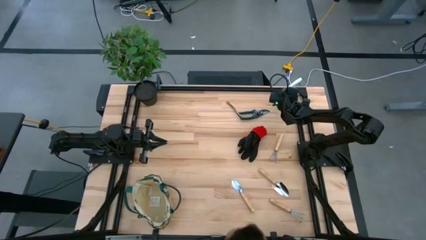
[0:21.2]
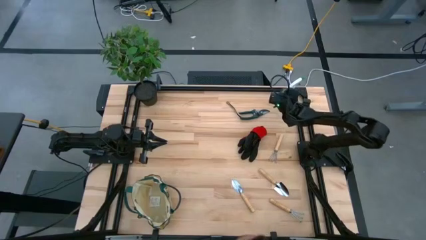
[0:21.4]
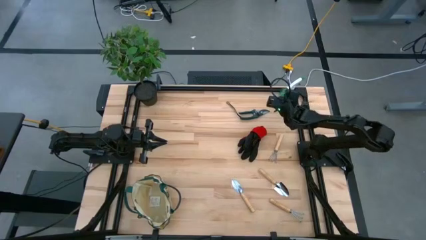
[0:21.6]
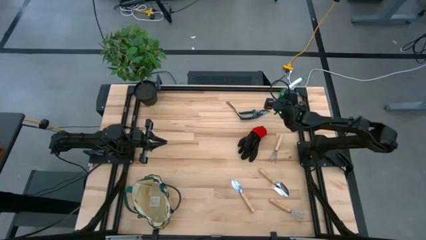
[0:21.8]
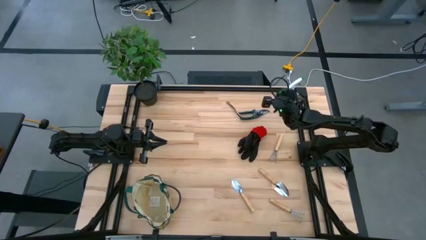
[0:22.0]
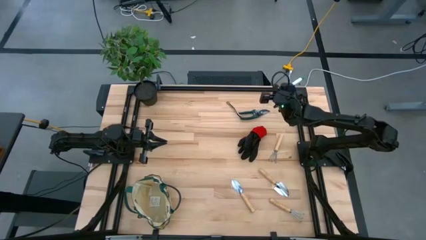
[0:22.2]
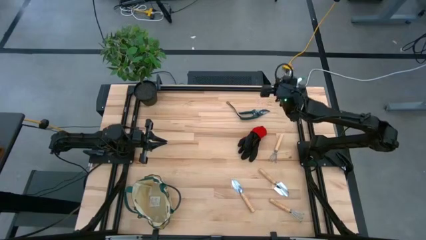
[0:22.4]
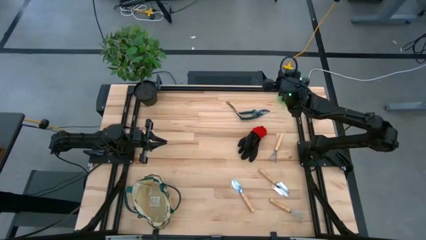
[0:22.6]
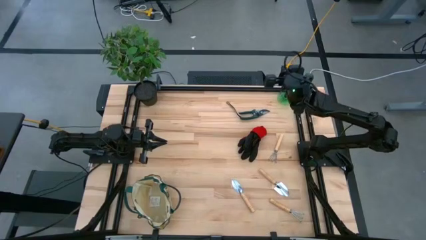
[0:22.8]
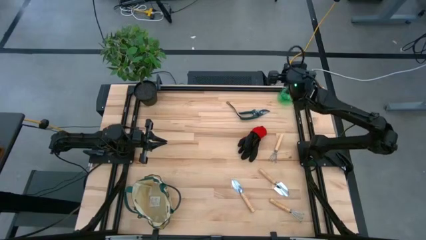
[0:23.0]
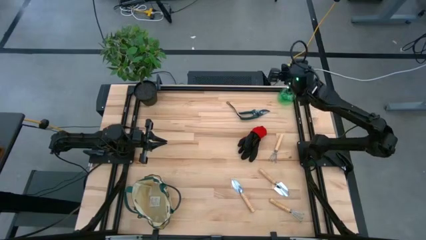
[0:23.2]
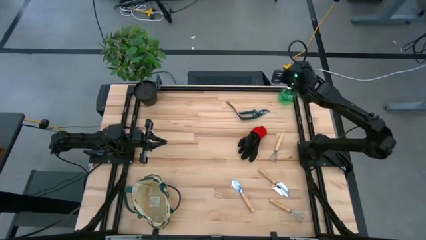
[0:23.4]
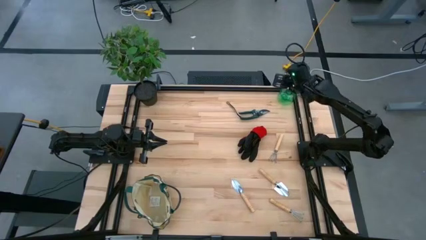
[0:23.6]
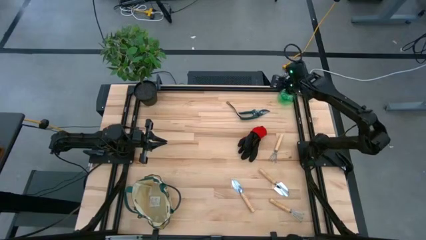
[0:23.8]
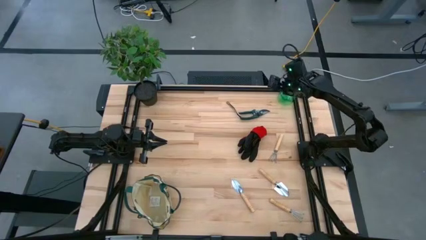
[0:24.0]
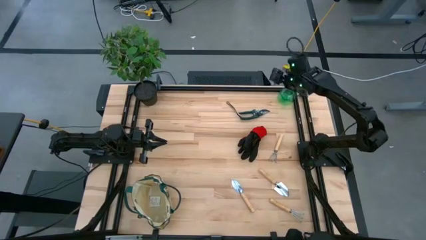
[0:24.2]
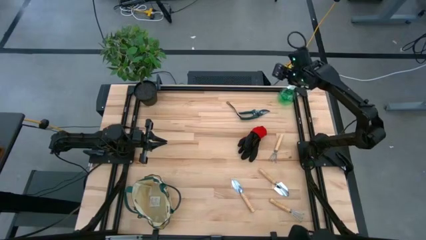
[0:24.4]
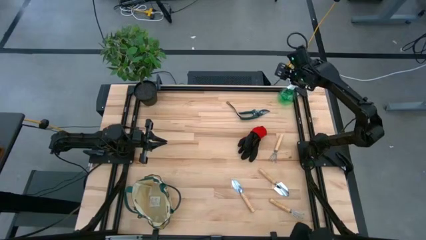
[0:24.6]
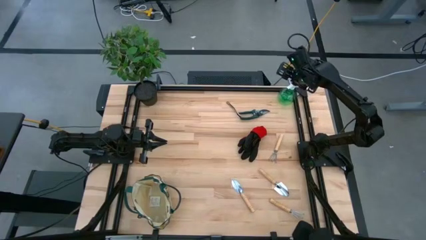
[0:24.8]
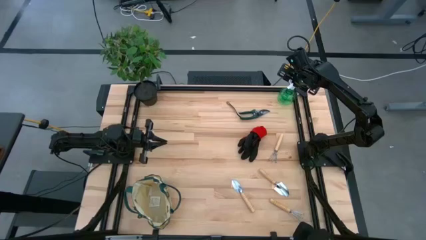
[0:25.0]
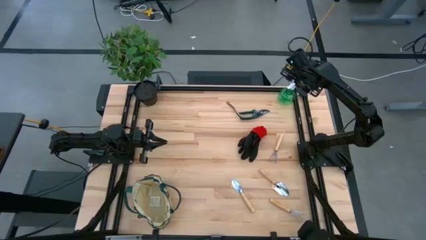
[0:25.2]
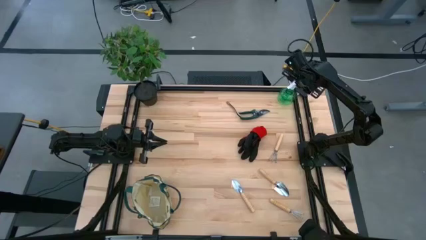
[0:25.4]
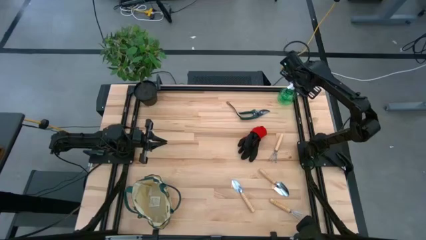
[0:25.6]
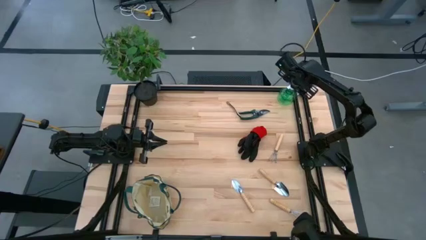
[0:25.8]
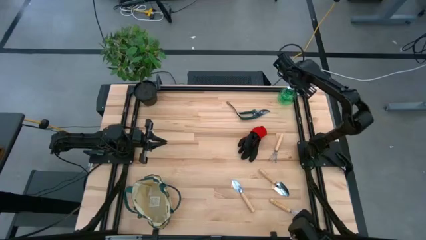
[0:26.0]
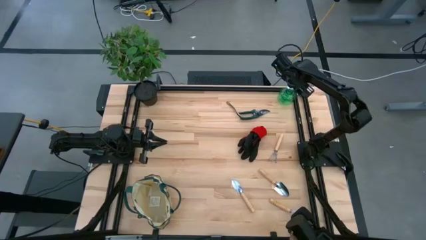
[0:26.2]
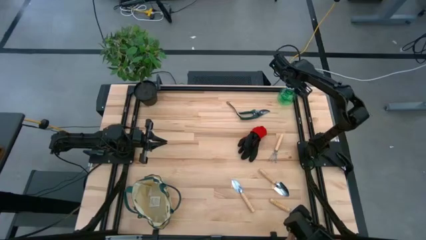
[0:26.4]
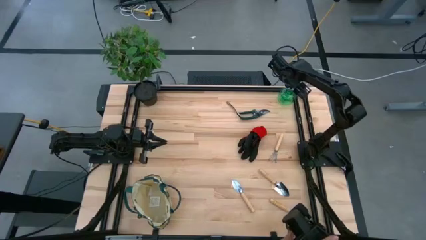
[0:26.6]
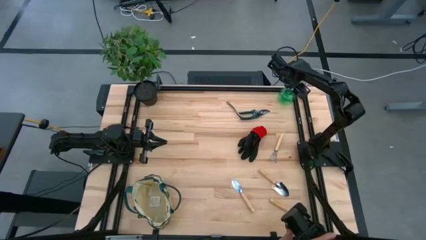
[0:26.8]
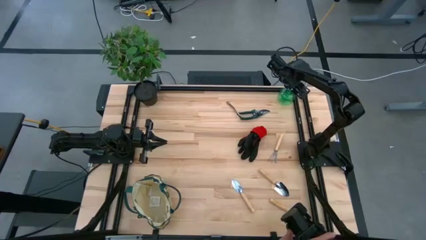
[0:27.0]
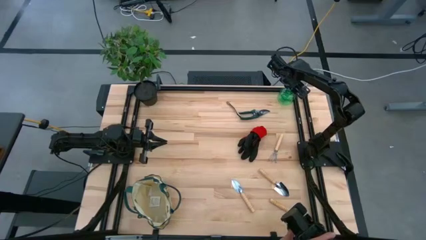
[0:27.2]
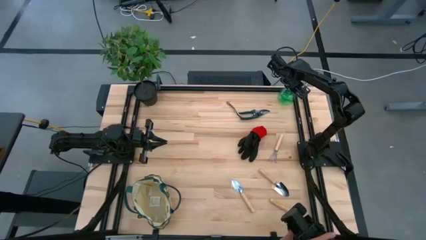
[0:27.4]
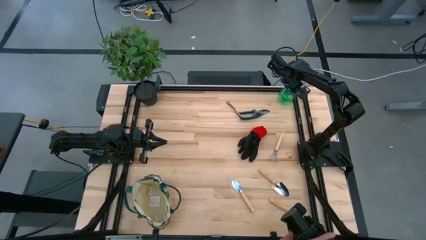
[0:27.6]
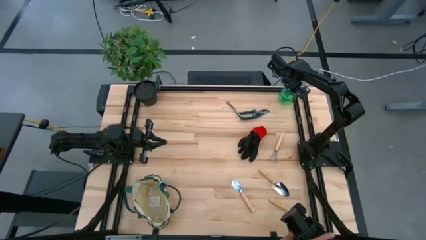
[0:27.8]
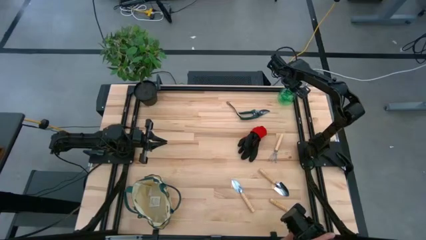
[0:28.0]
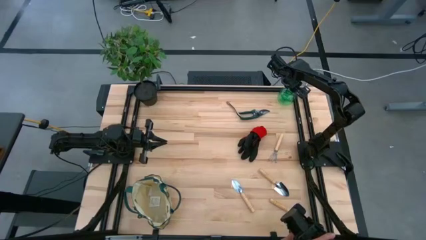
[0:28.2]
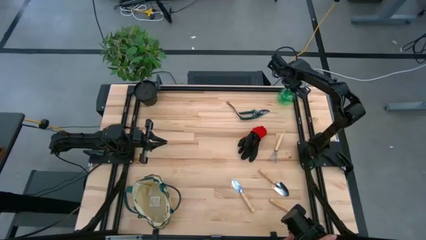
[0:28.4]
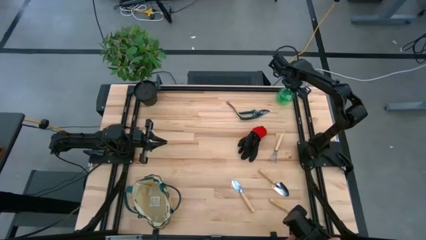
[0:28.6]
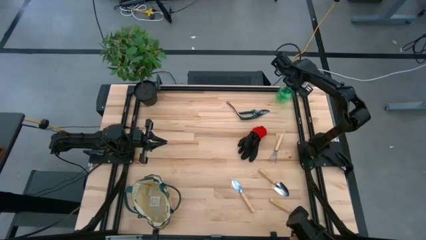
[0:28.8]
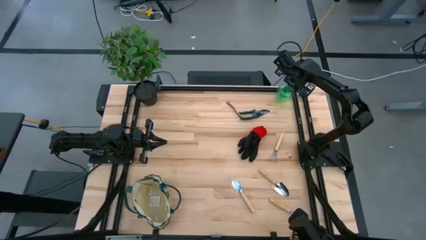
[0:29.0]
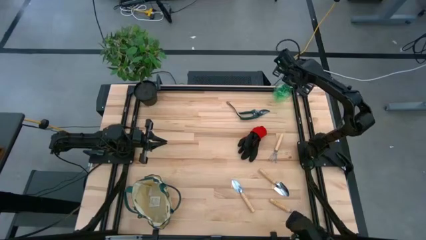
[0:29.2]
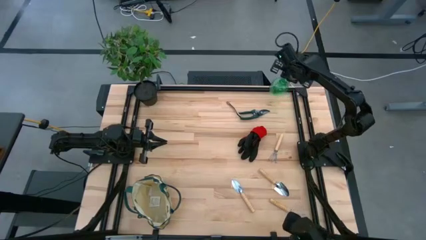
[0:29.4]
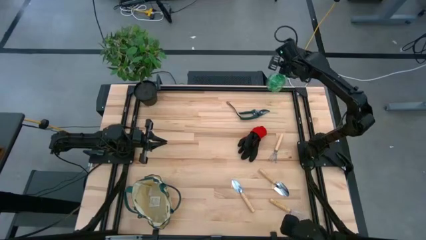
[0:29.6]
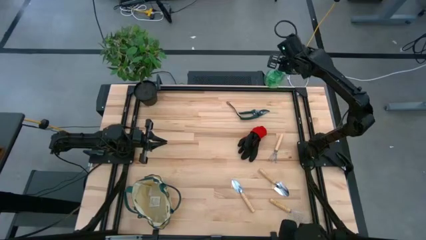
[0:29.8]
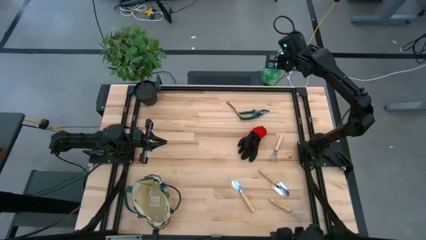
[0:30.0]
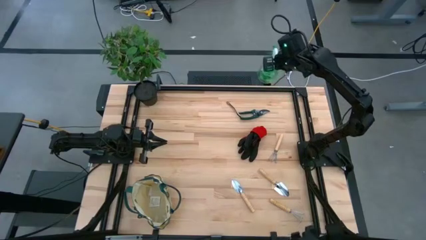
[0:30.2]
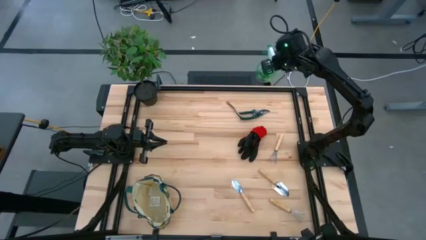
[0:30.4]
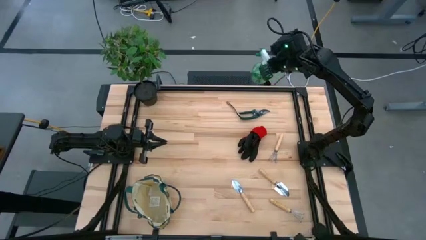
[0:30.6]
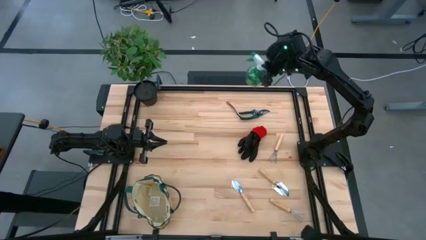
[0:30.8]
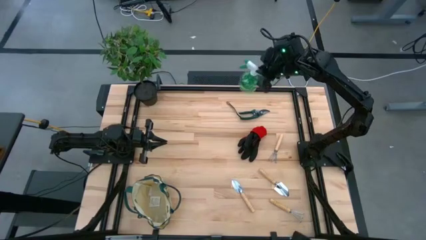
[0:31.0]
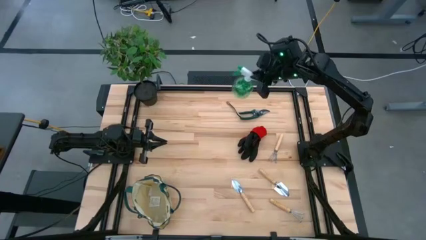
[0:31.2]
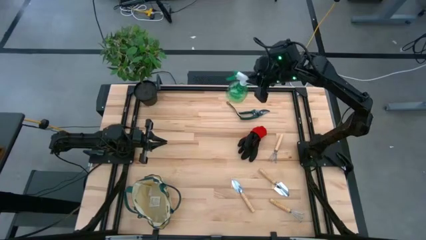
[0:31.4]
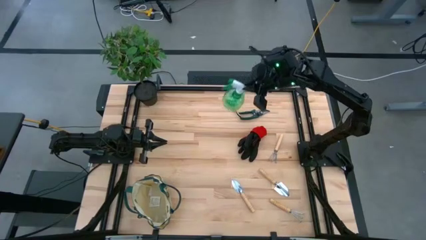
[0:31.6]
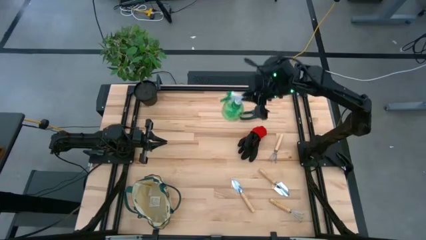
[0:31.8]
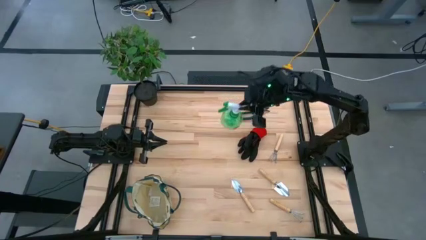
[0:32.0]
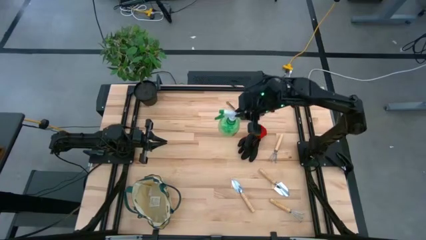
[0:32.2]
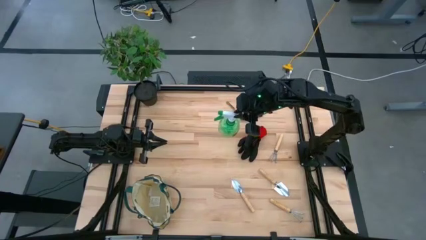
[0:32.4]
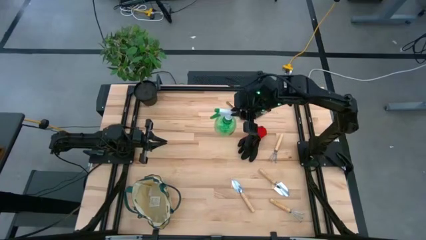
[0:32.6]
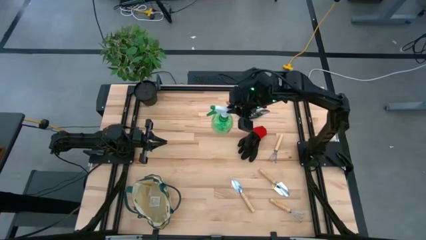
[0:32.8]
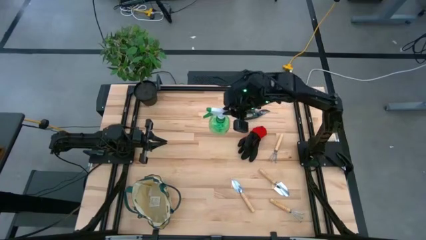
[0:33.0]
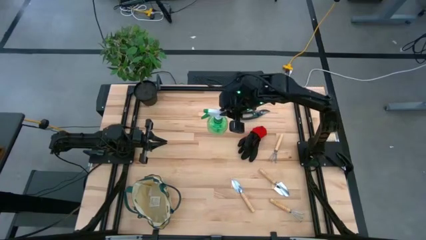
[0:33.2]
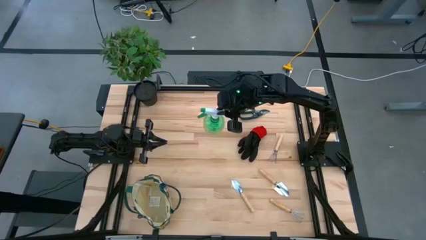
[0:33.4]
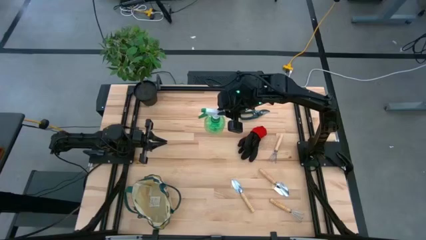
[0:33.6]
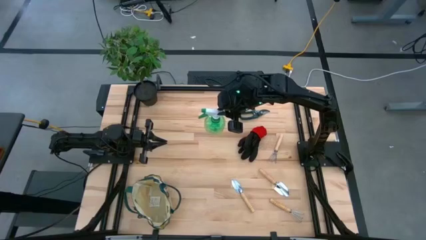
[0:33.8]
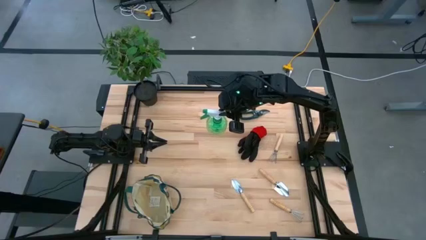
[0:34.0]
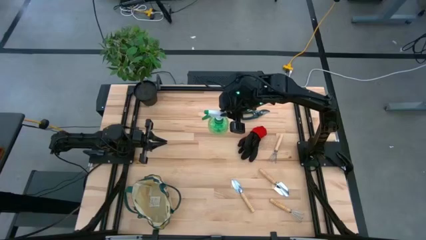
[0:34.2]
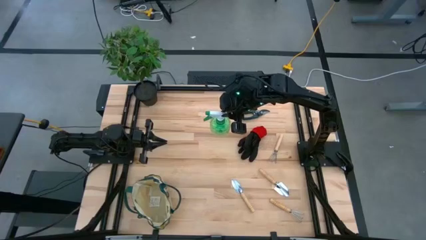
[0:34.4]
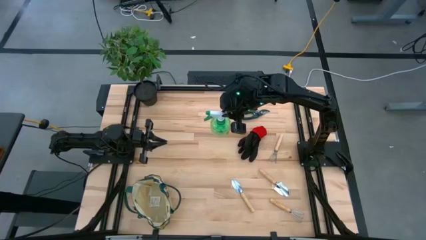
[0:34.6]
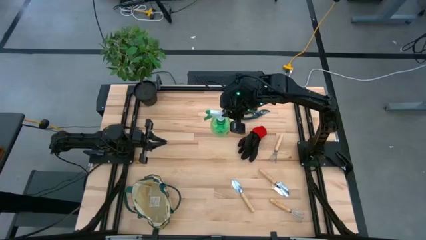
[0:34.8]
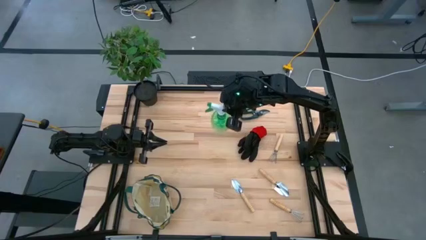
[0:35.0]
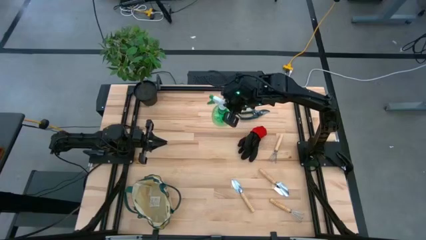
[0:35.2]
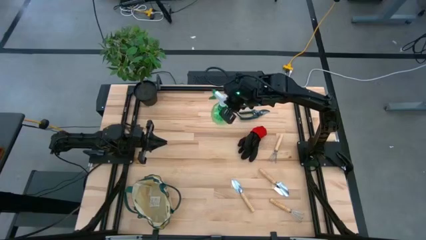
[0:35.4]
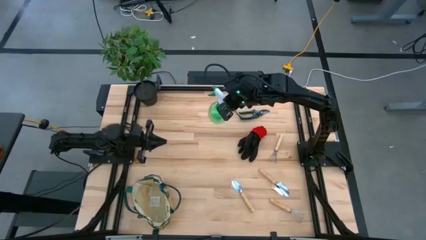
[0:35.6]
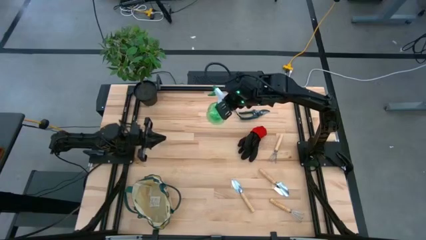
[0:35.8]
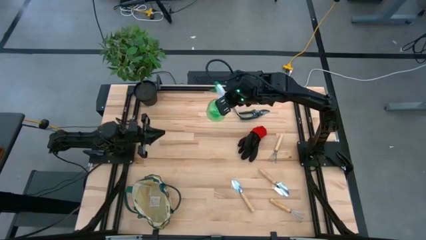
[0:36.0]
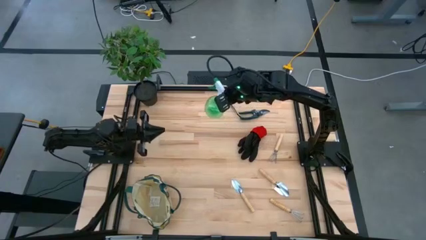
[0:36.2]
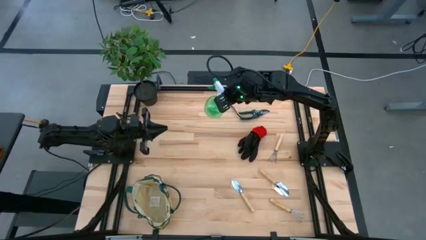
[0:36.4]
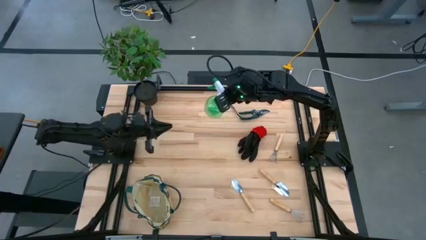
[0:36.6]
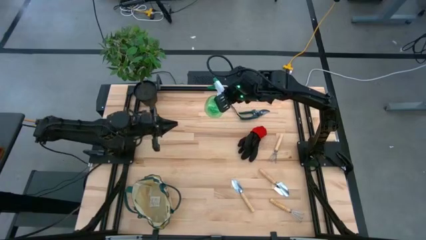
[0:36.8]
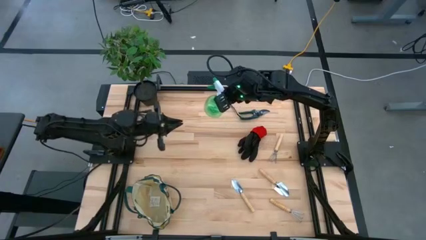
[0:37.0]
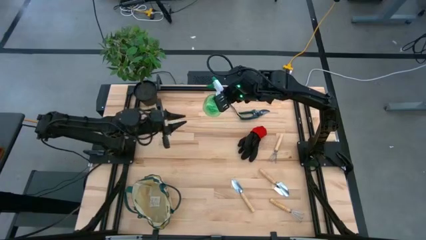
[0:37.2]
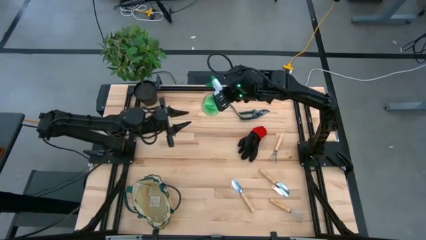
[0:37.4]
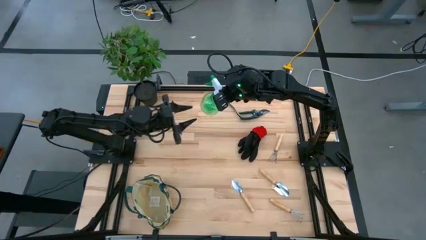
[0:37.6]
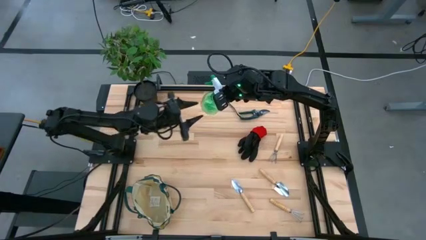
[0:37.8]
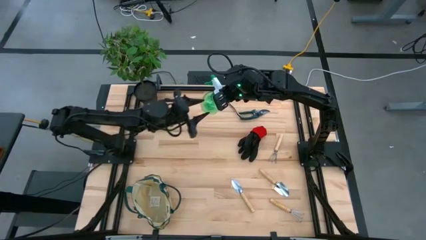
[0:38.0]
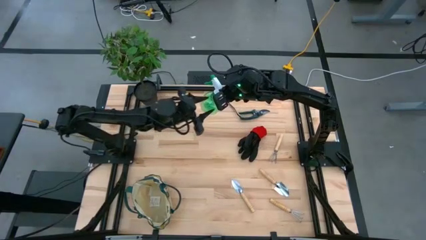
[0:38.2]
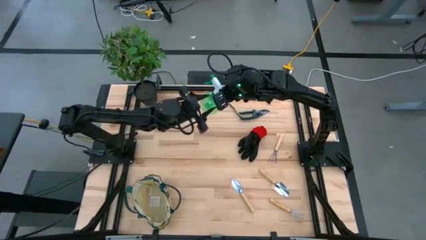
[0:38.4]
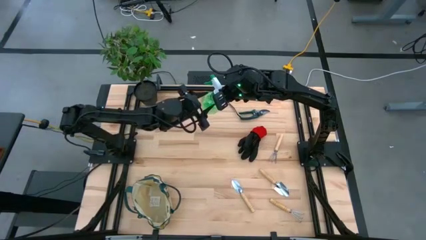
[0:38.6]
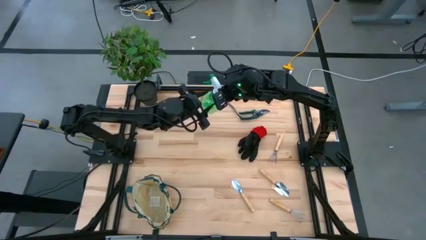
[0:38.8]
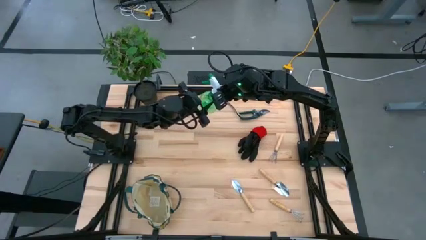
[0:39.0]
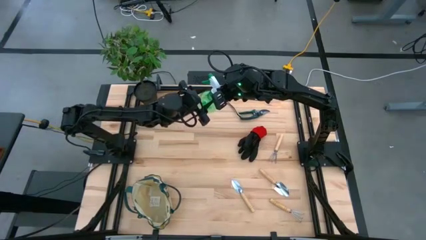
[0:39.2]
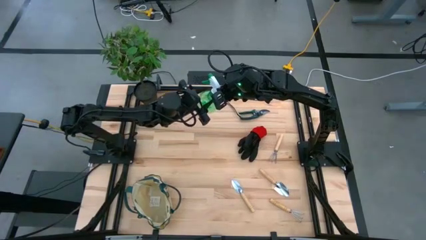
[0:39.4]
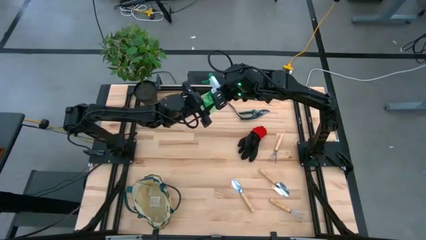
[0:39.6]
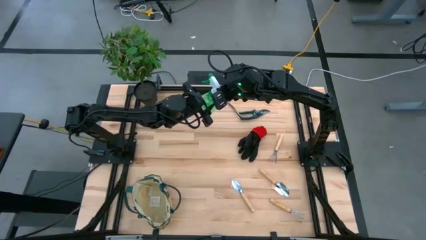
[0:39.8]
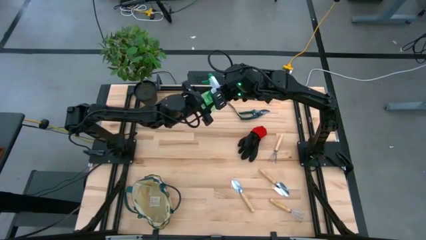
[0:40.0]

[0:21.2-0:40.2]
Task: Pick & Place Garden tools in Gardening bag
Put the spray bottle into the gardening bag
